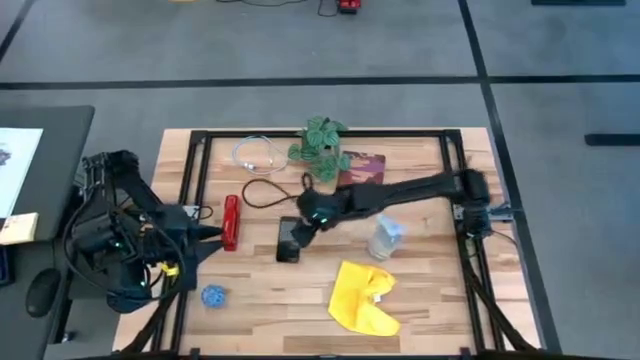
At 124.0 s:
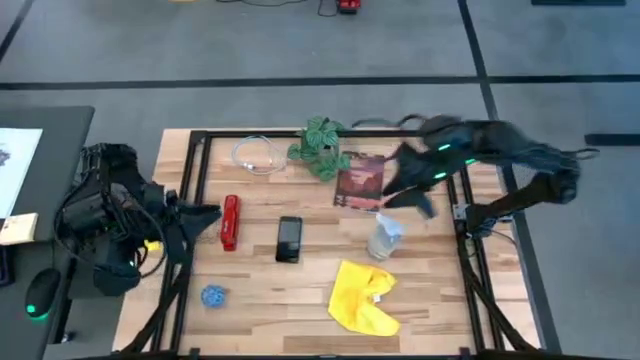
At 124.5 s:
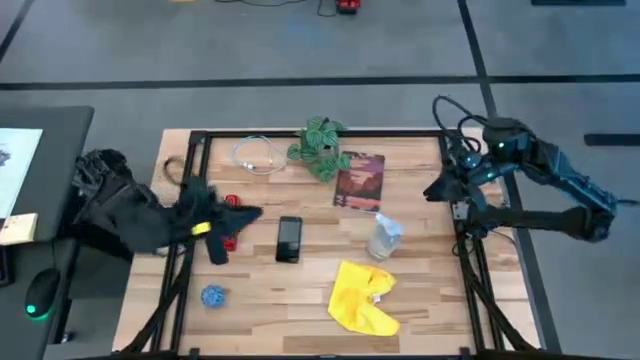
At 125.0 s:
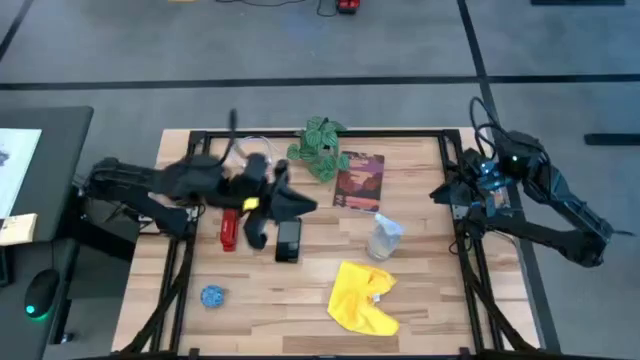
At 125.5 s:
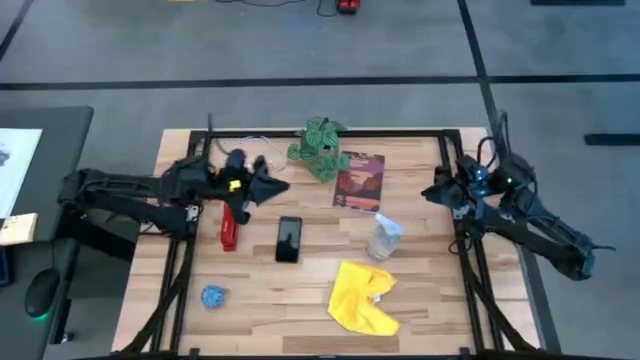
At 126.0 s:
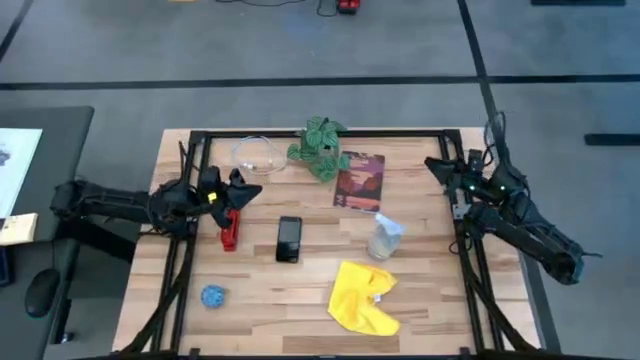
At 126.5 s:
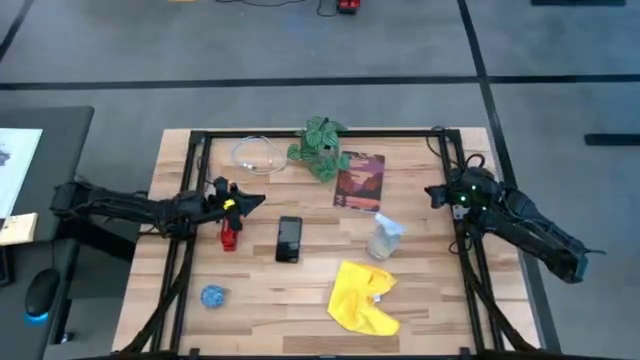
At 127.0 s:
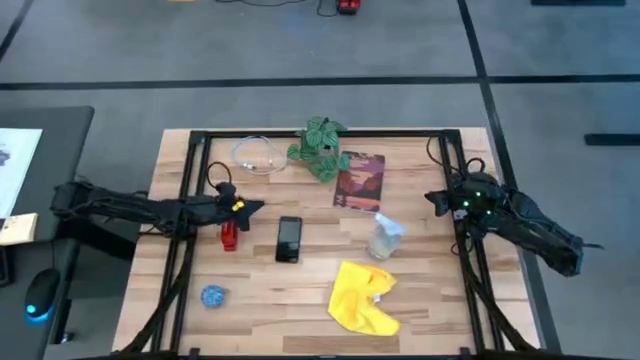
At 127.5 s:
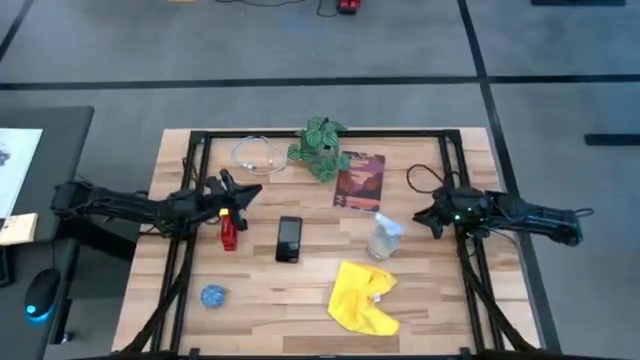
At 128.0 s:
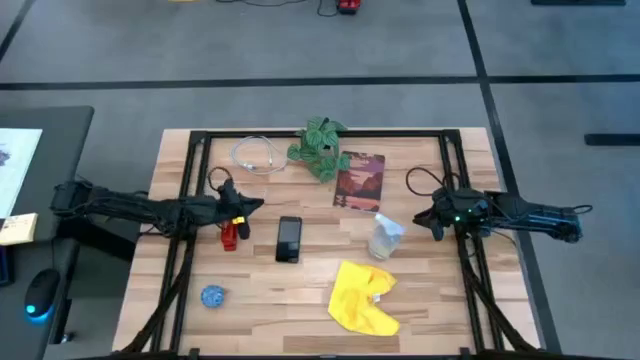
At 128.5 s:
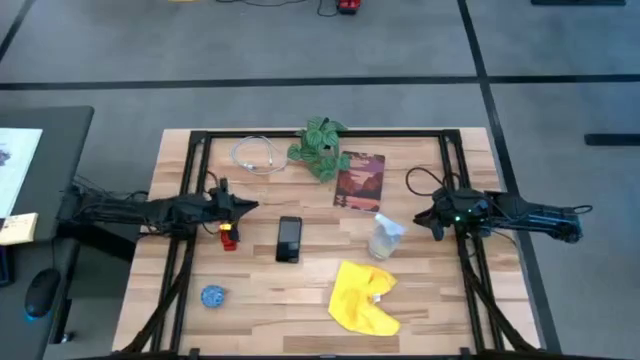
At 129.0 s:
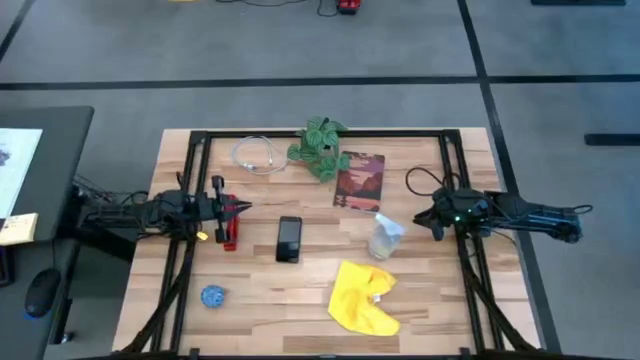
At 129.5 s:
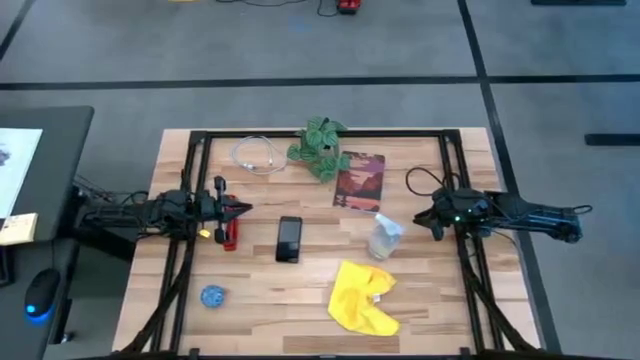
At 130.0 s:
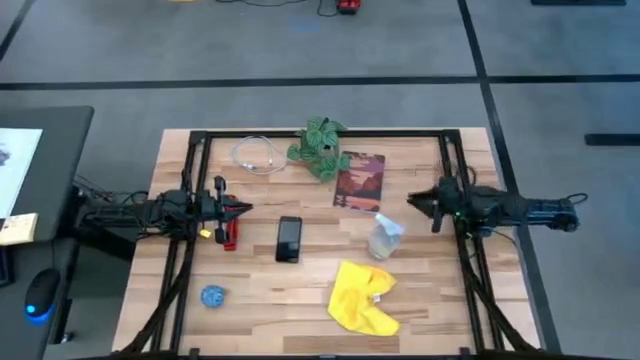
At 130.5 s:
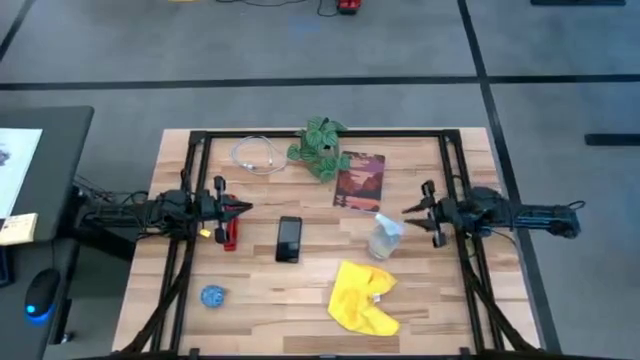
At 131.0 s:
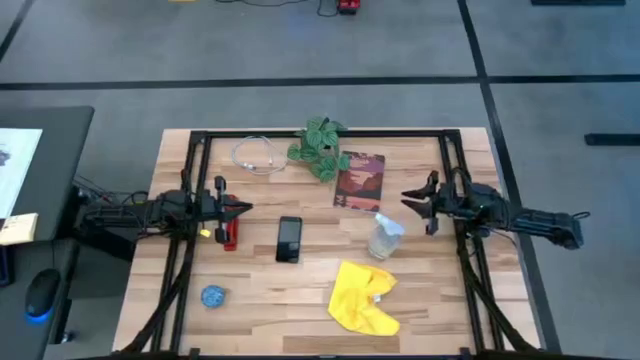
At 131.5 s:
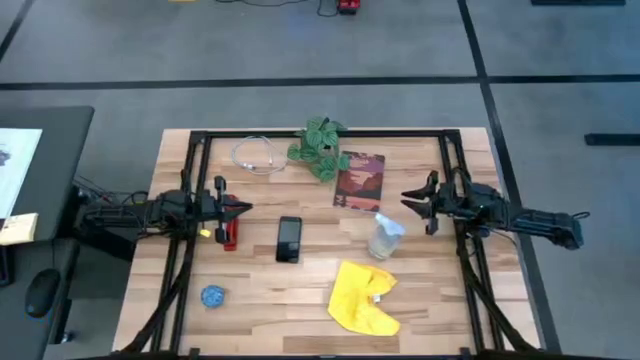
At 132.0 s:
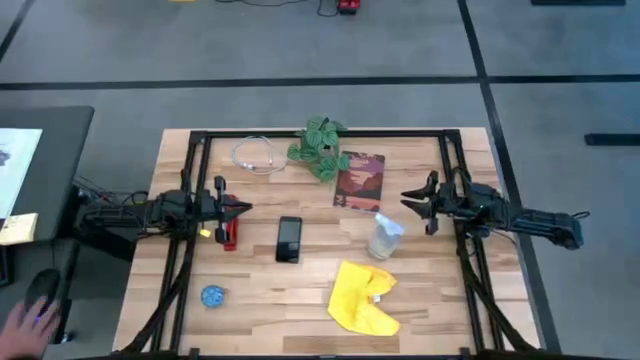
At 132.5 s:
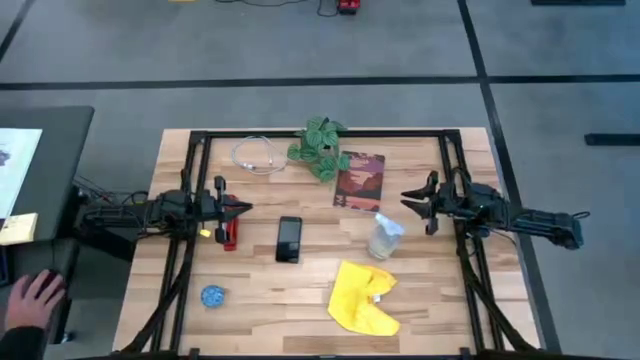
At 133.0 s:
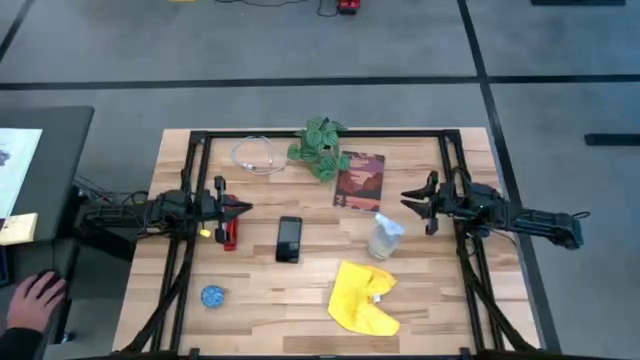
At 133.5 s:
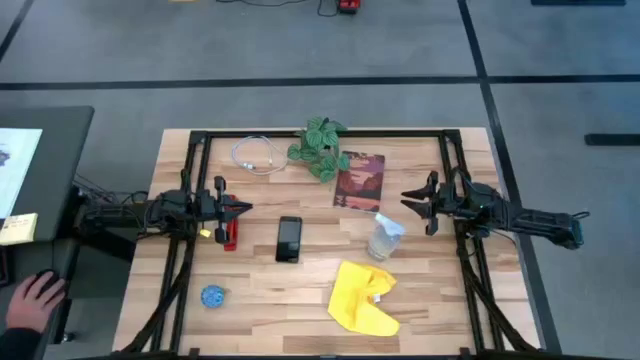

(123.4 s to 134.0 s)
Task: Apply microfiber cloth
Return to Home Position

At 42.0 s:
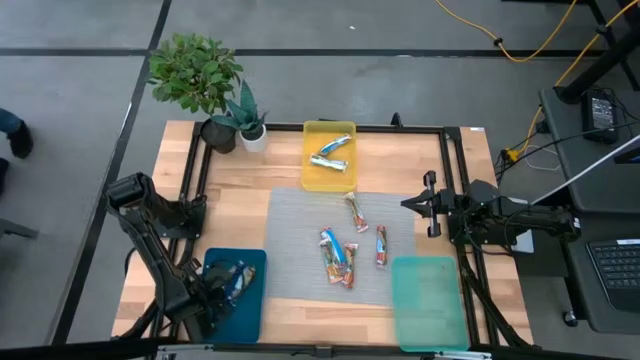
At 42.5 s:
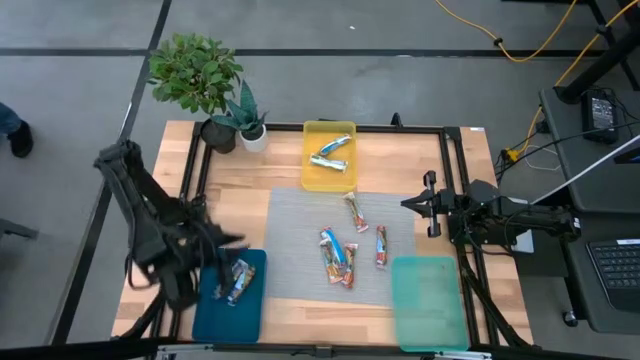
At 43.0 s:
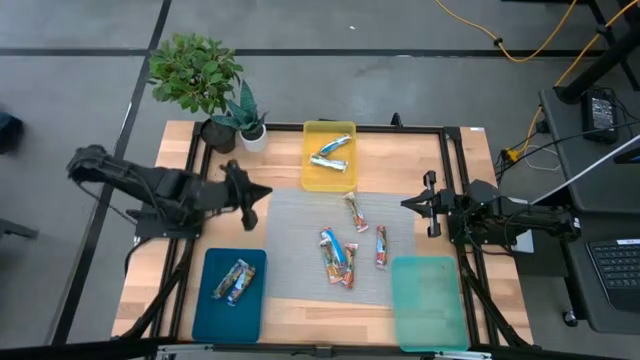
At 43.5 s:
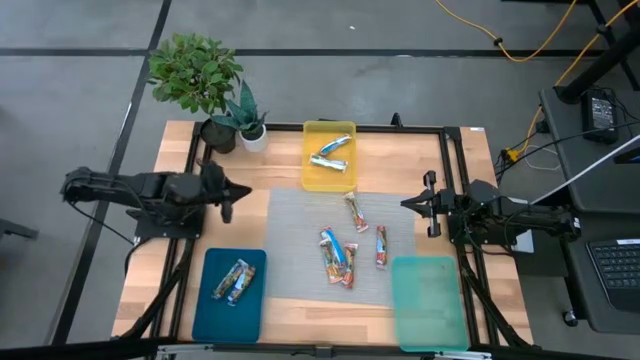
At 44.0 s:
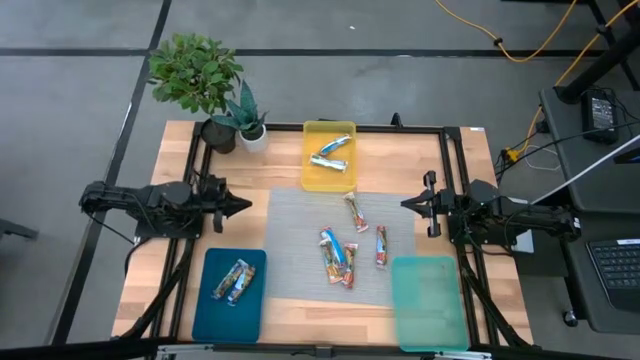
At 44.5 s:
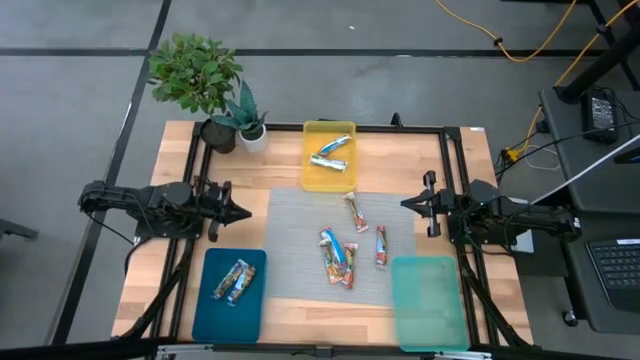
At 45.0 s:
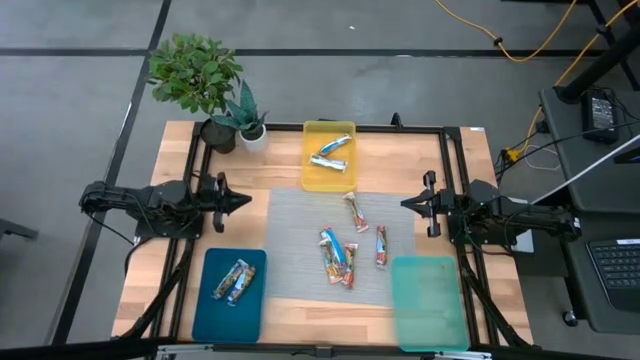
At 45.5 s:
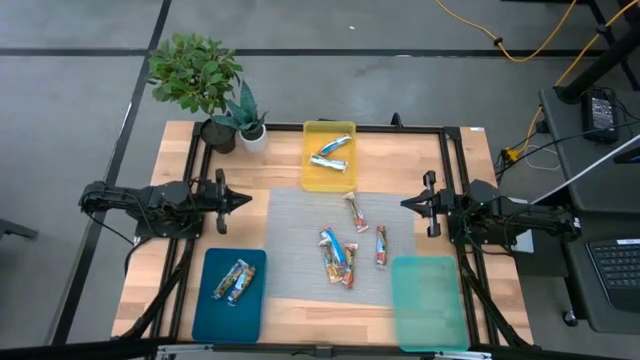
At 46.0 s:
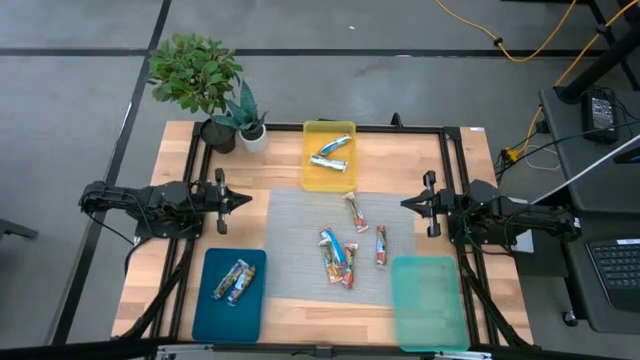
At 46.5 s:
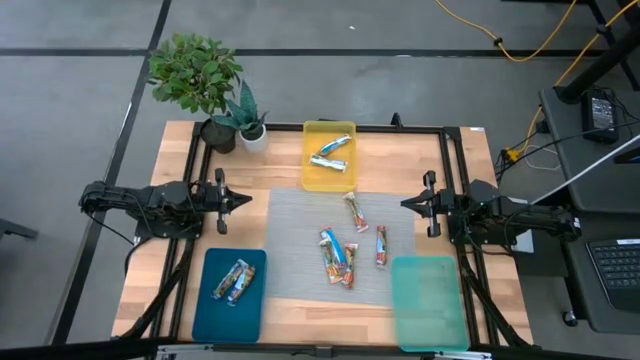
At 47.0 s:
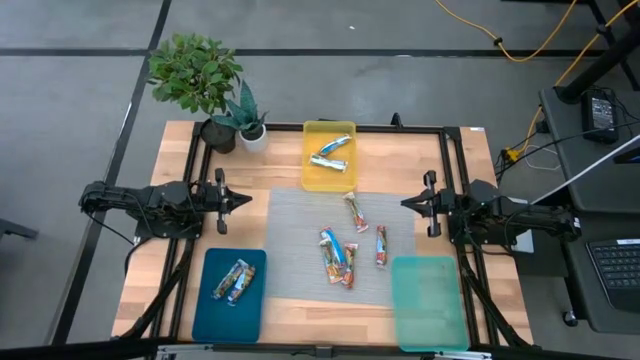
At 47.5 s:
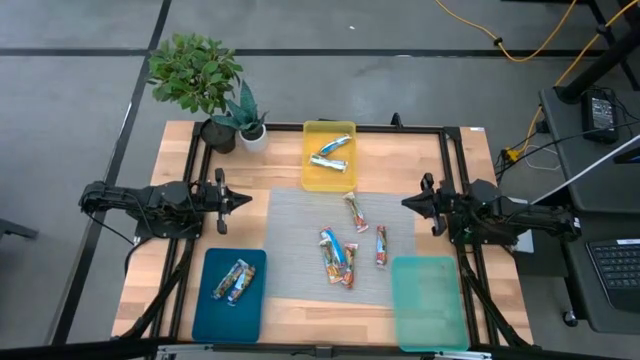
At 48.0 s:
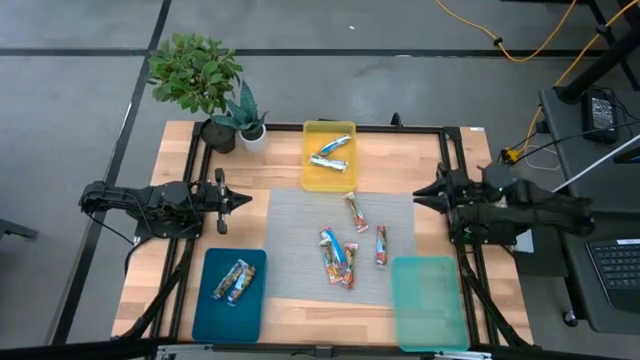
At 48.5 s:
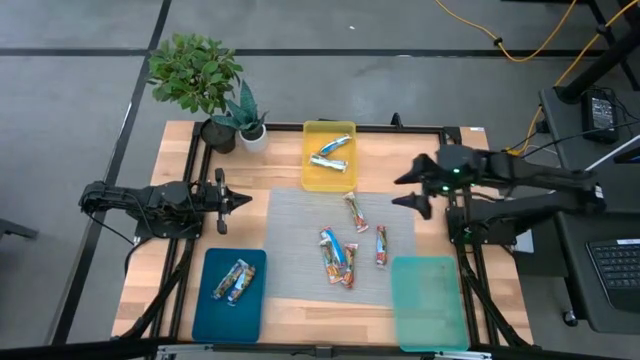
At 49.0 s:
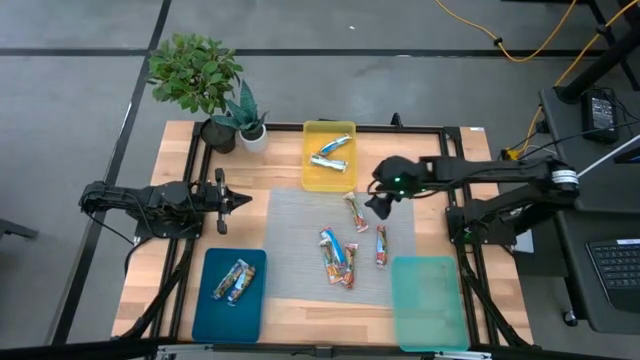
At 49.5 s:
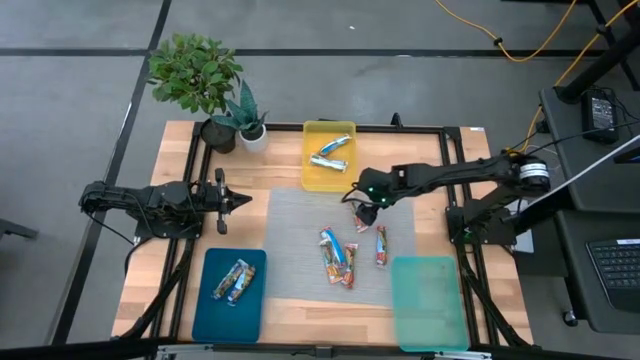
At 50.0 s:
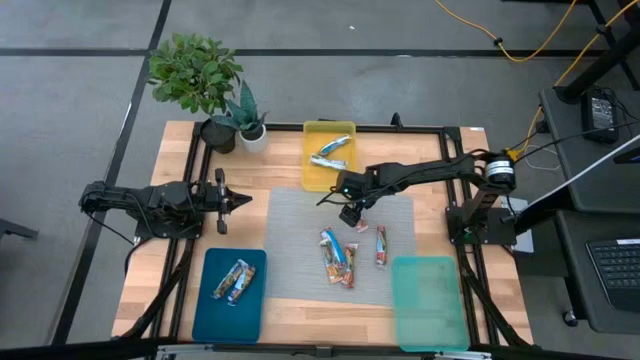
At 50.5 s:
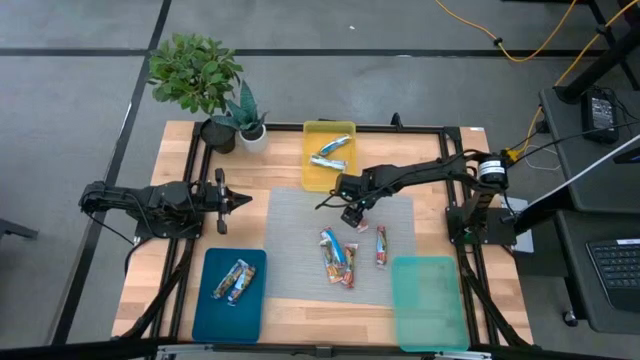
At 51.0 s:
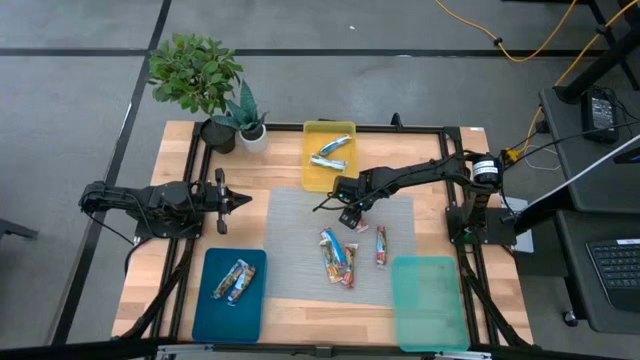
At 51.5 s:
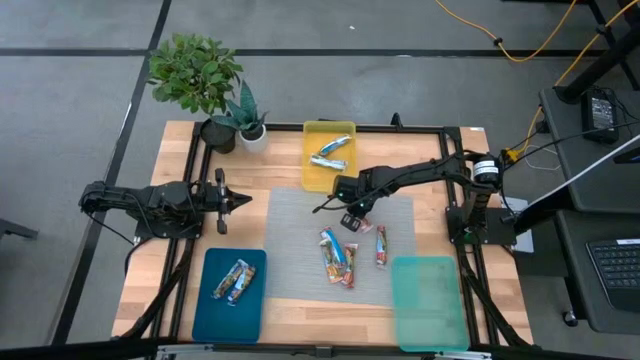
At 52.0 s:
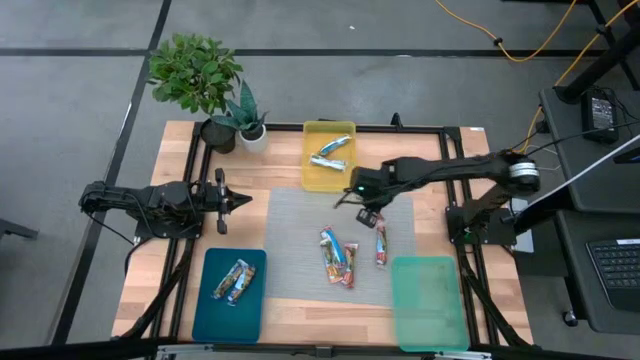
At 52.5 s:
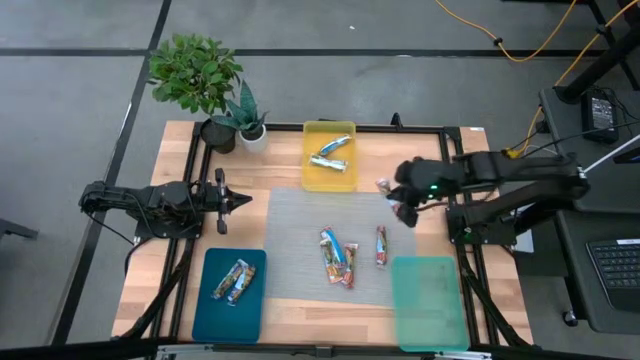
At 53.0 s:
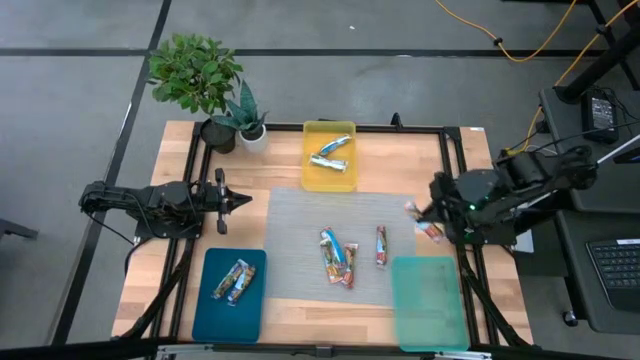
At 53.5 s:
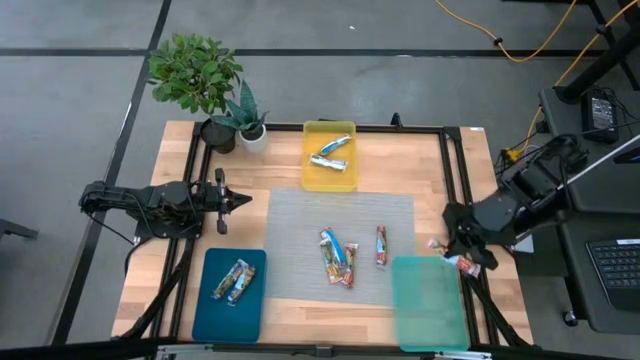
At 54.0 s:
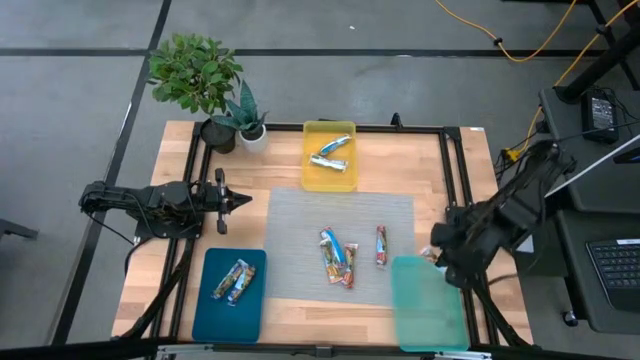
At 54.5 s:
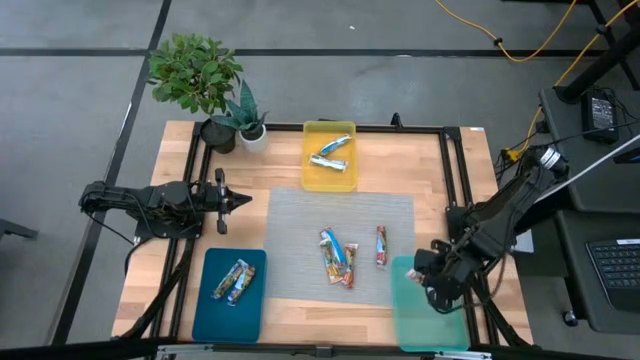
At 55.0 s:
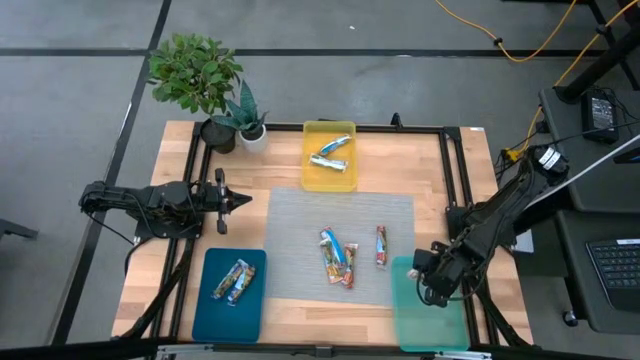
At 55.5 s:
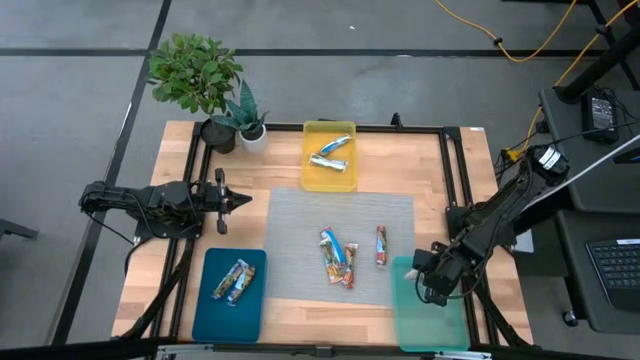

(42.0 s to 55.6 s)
Task: Pick and place Granola Bars by type
Put the red granola bar into the light blue bin
